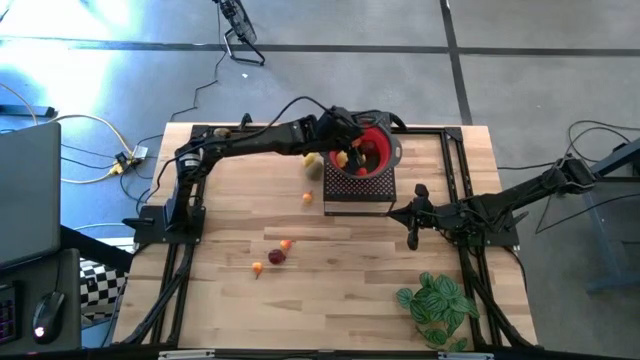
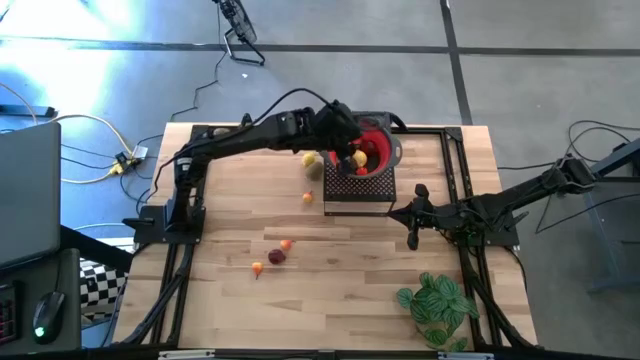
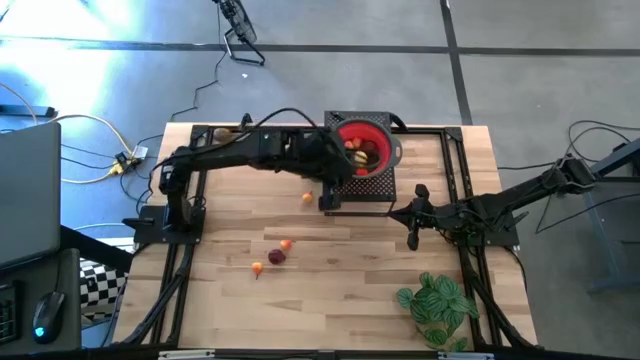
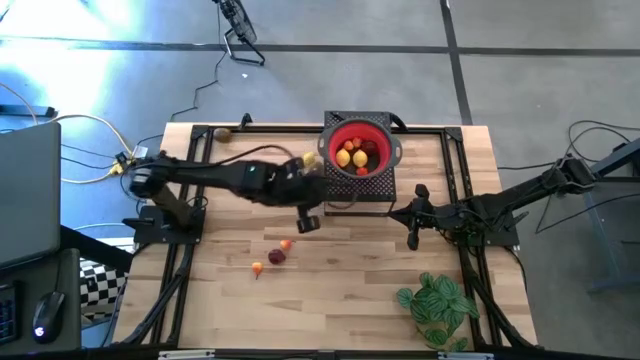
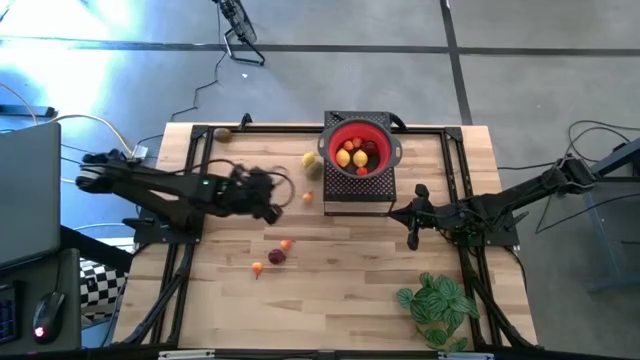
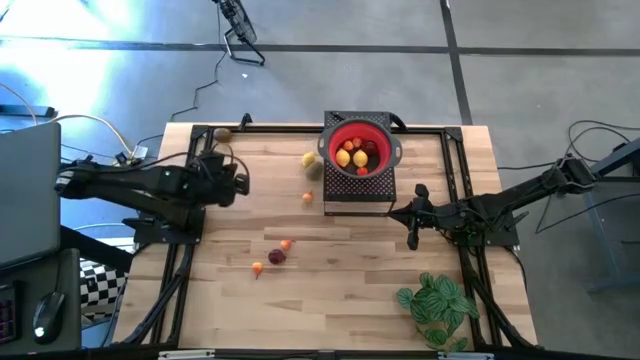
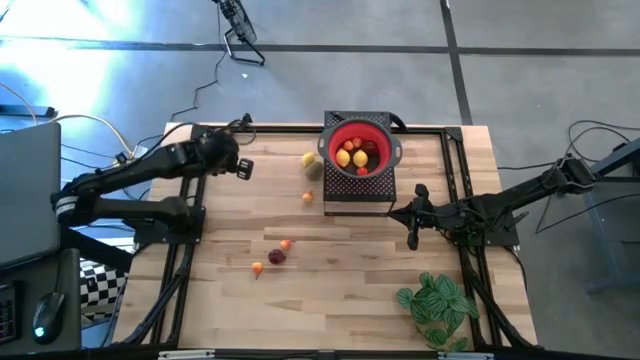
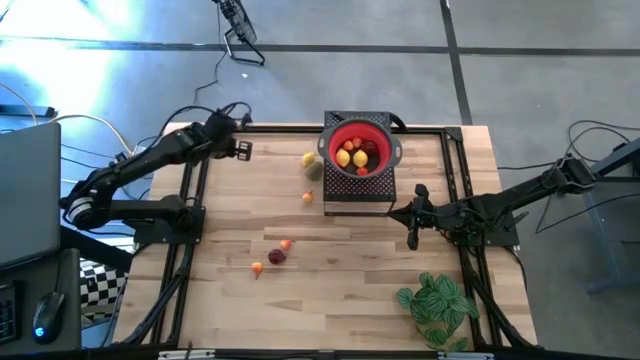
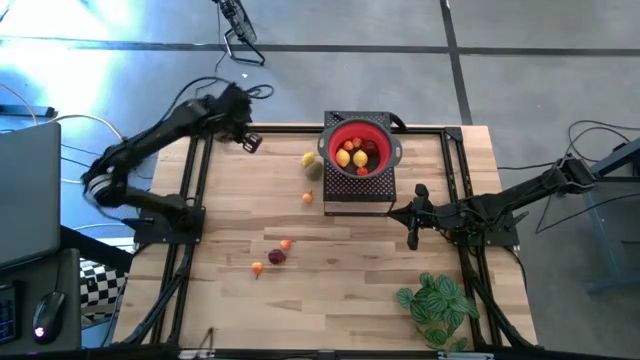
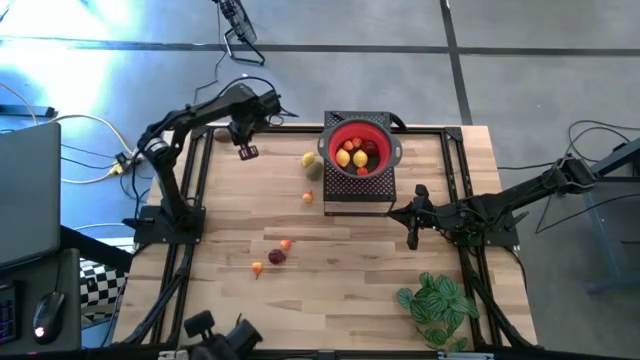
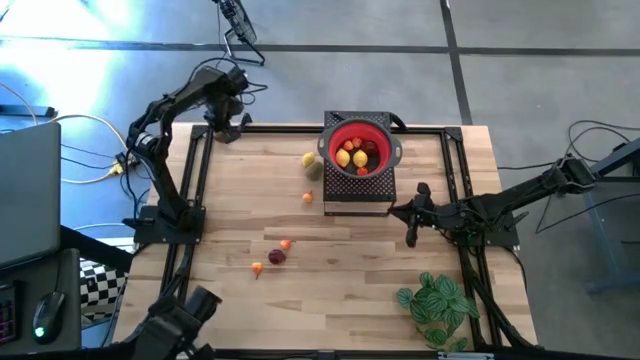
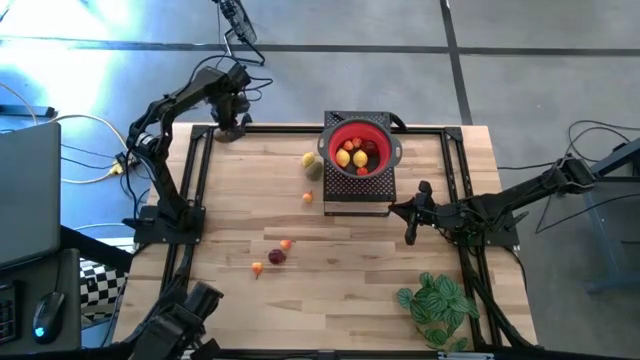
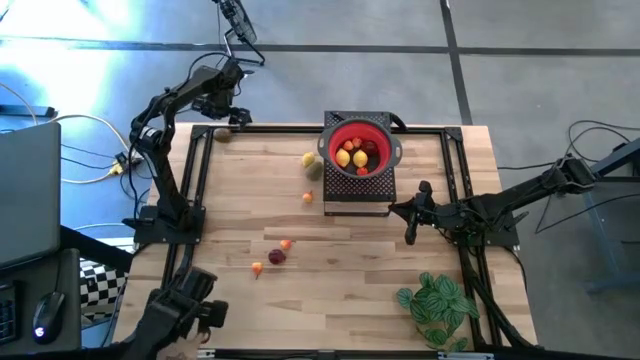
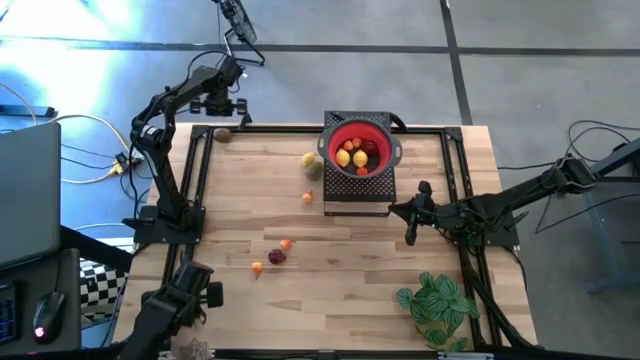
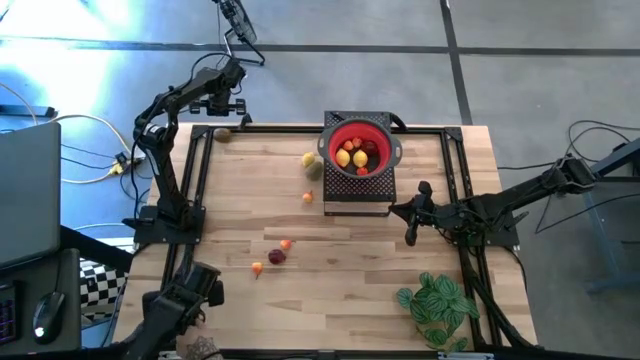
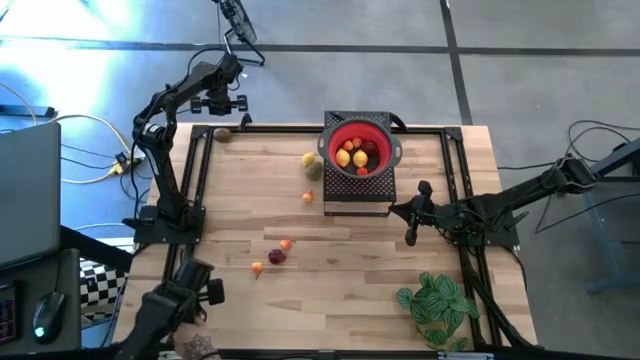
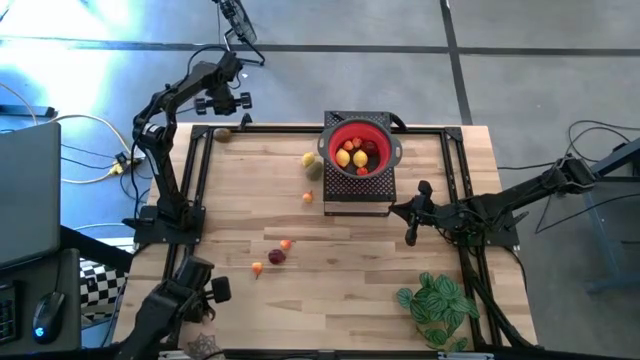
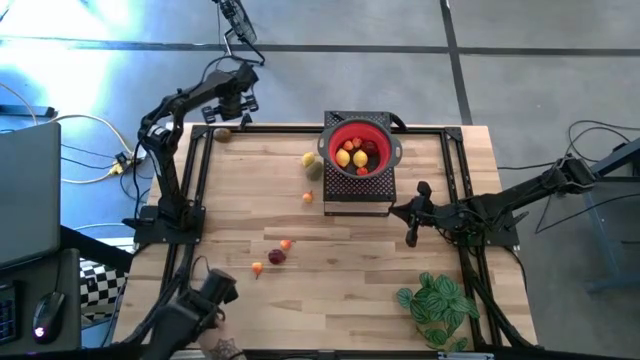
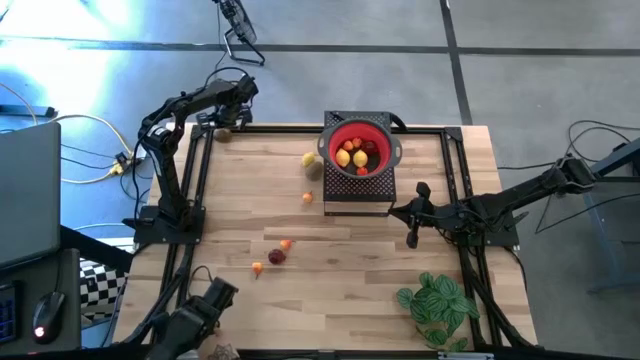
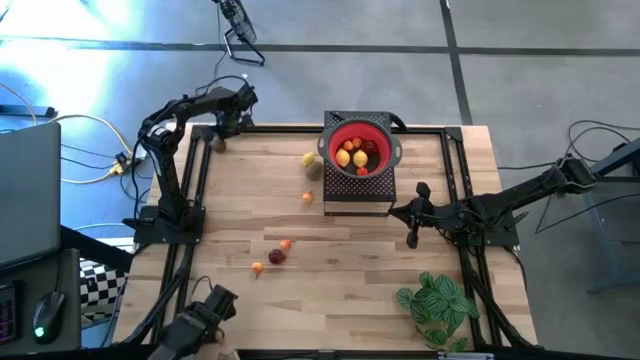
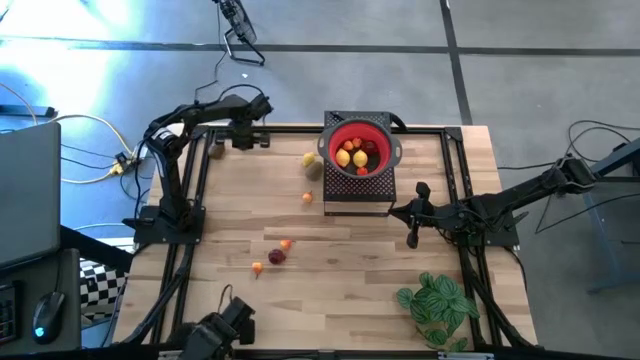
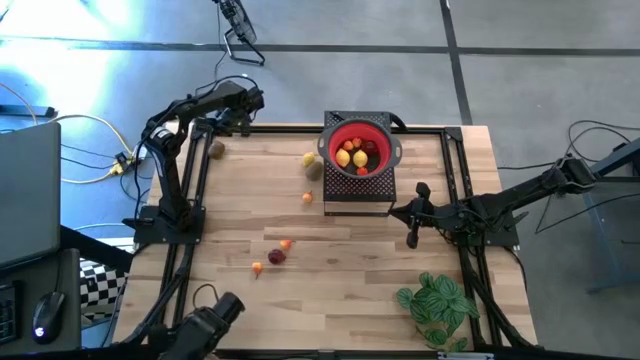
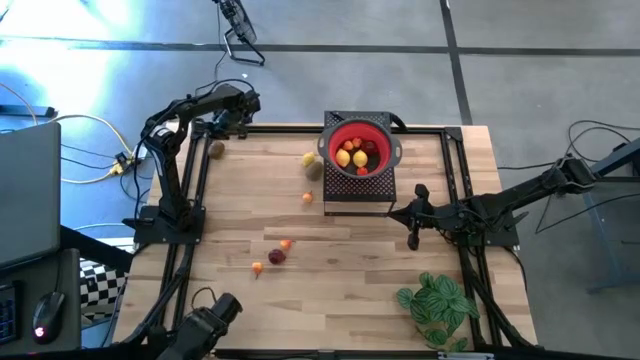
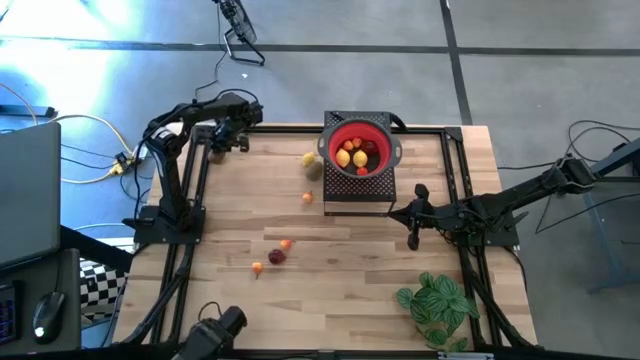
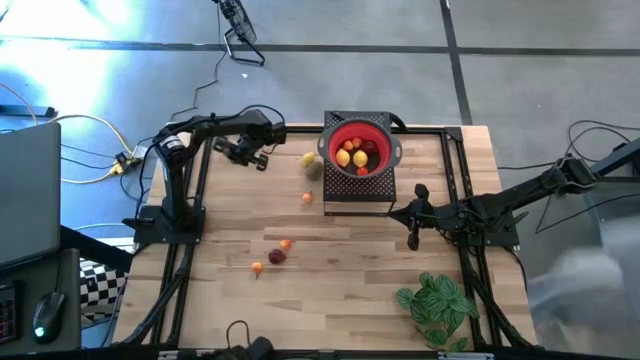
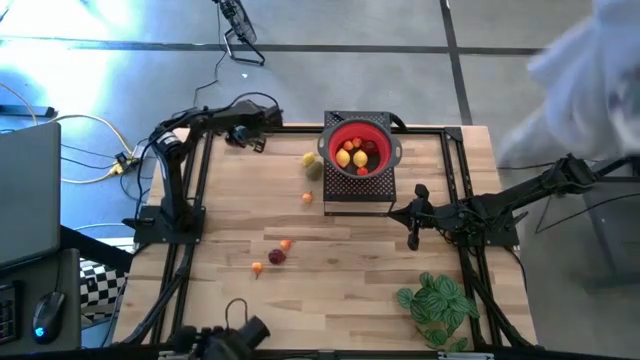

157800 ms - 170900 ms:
Task: Pick & Place Fruit
Put the left brown kiwi into the red strainer bowl on the shelf

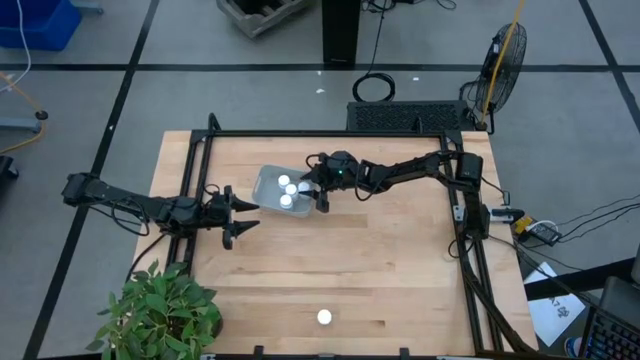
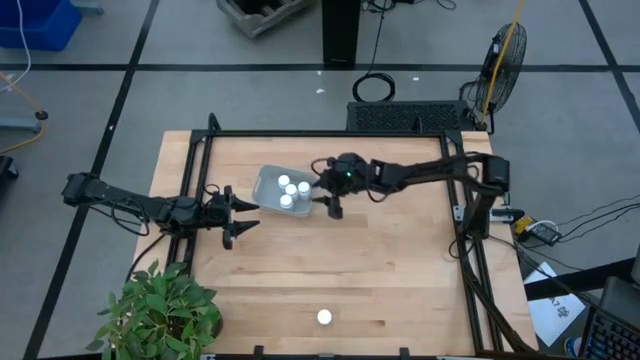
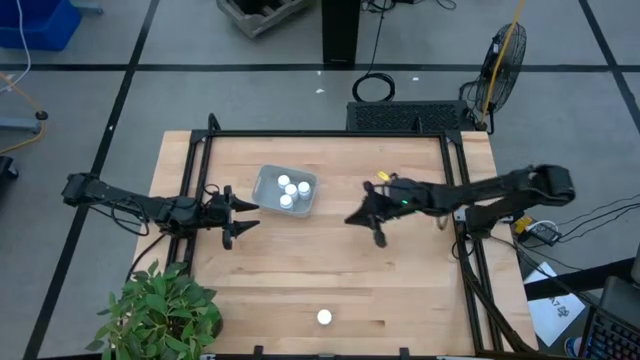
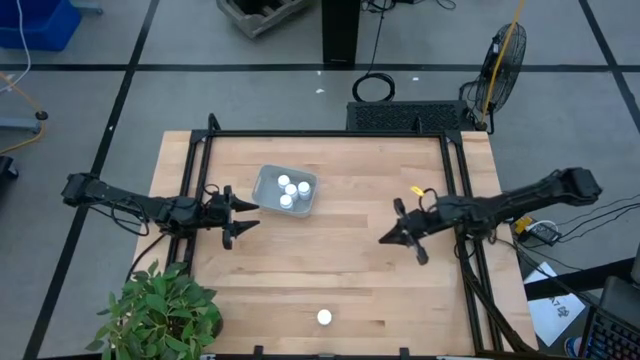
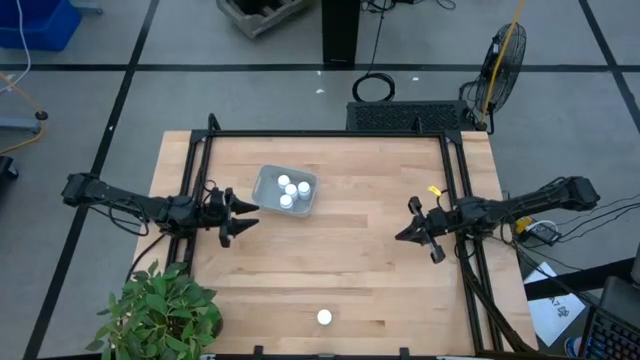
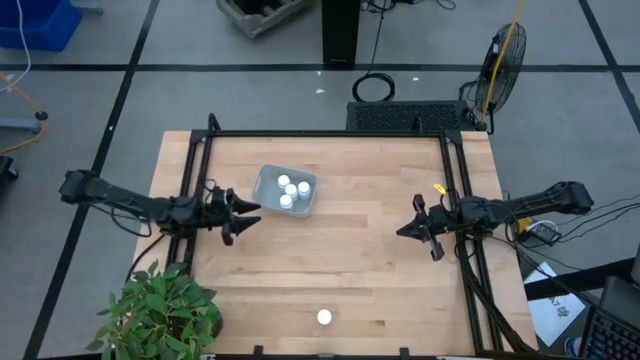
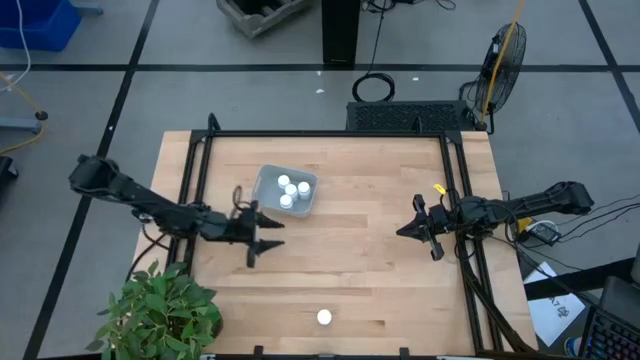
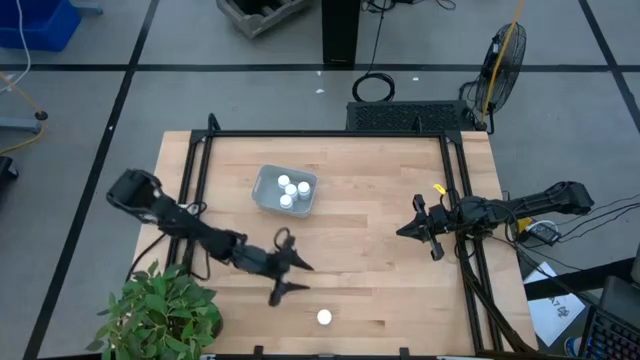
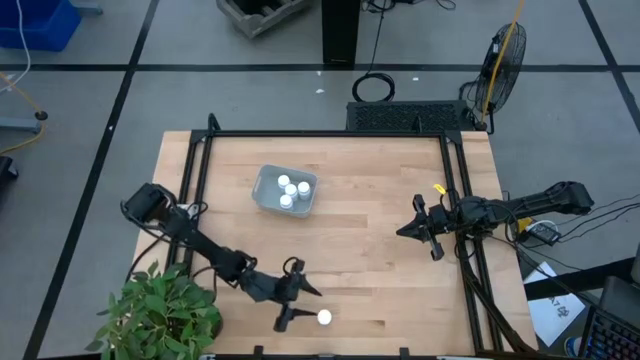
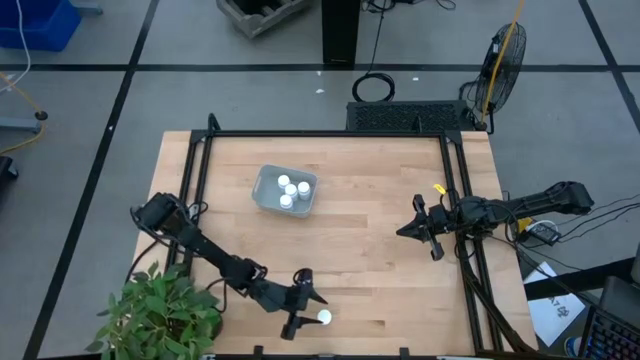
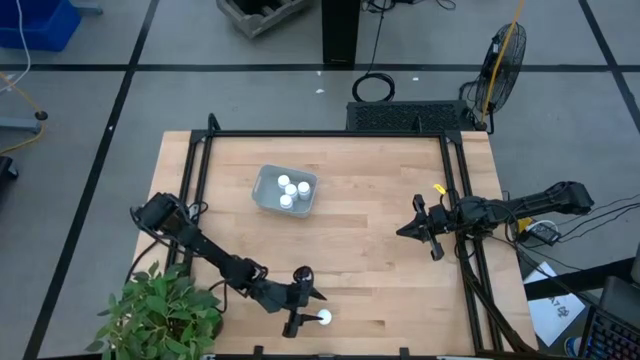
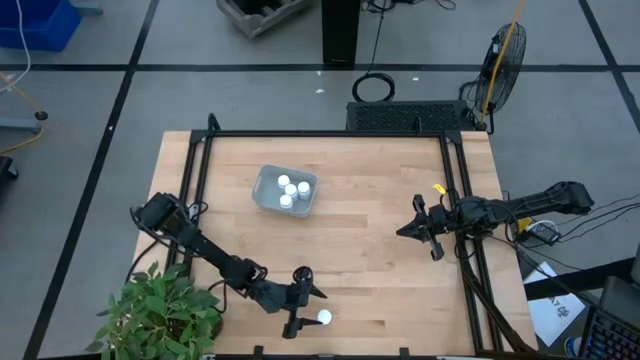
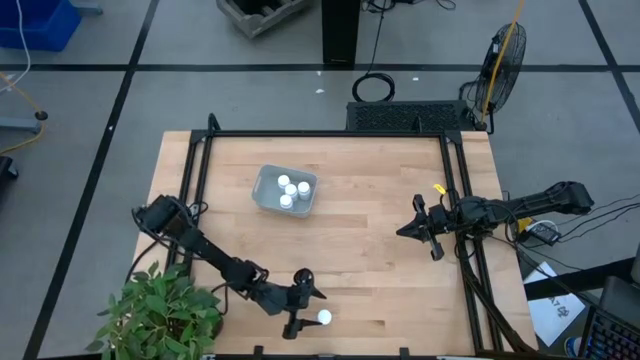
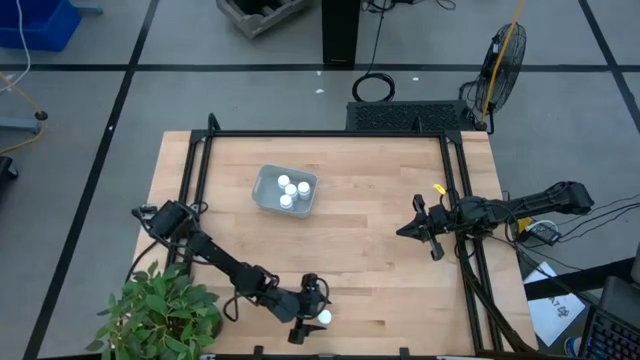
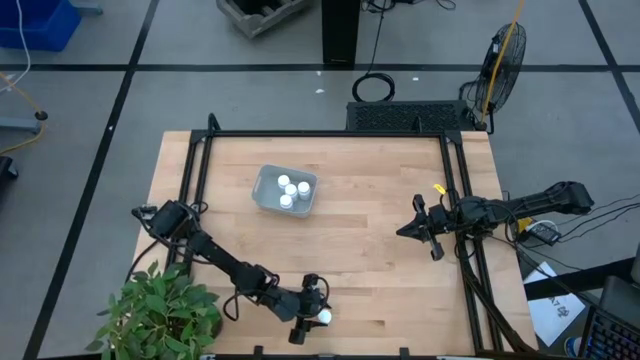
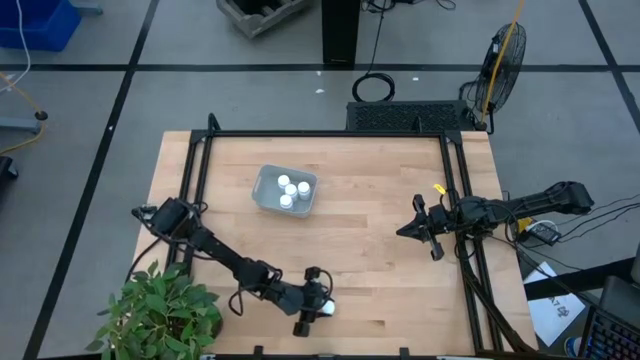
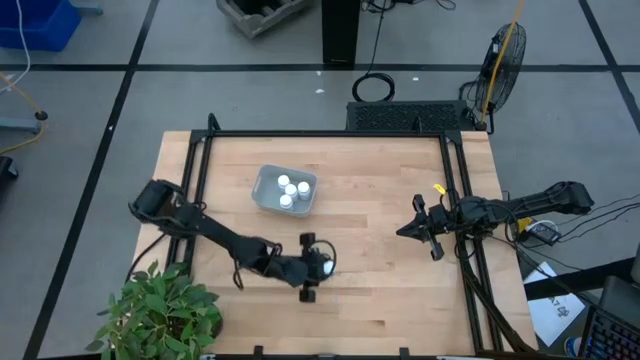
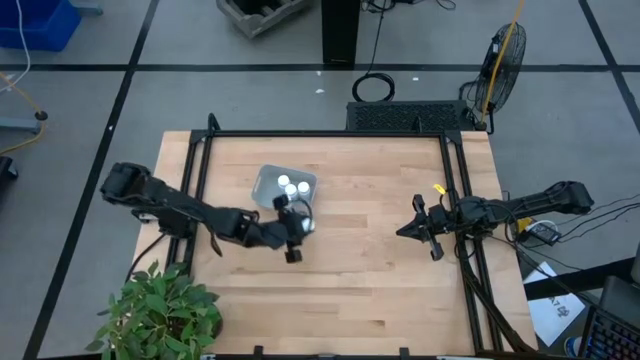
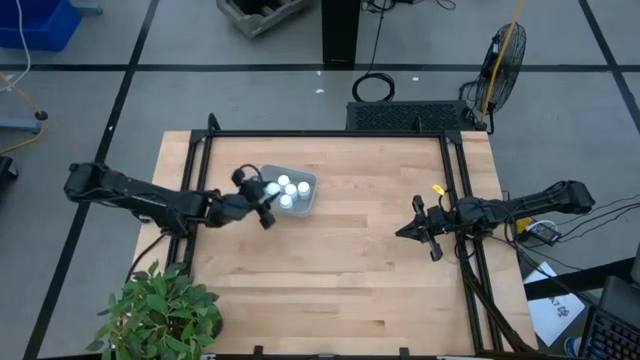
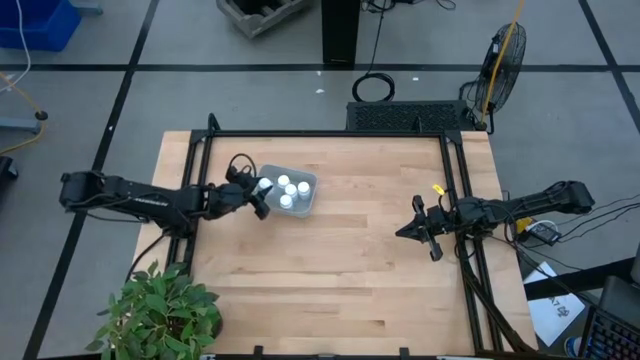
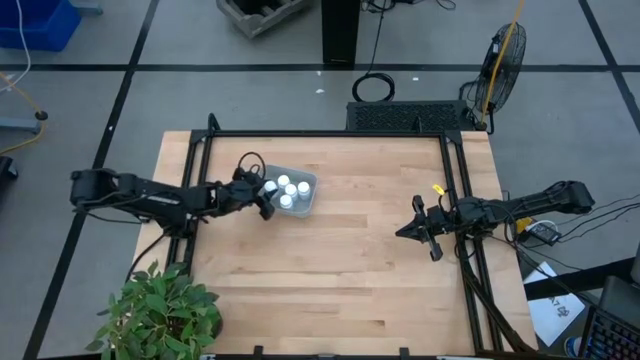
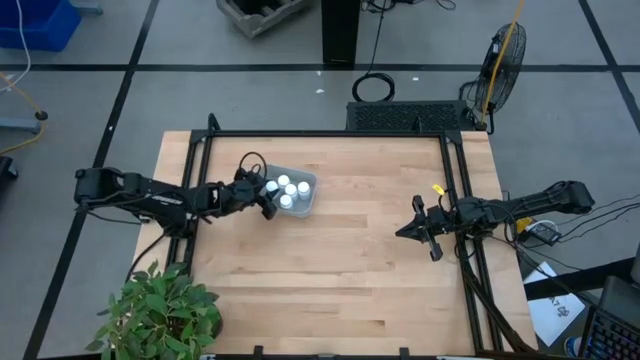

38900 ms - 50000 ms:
Task: Pick and place pill bottles into a basket
Put the white medicine bottle into the gray basket
